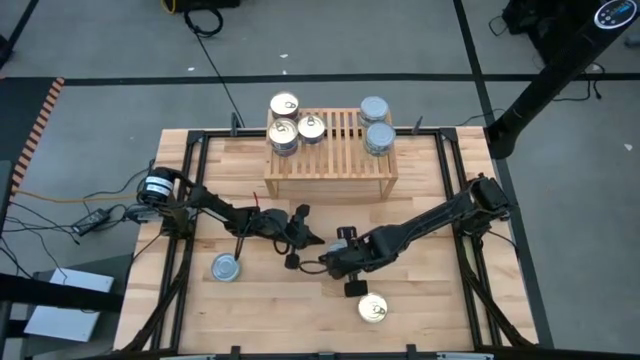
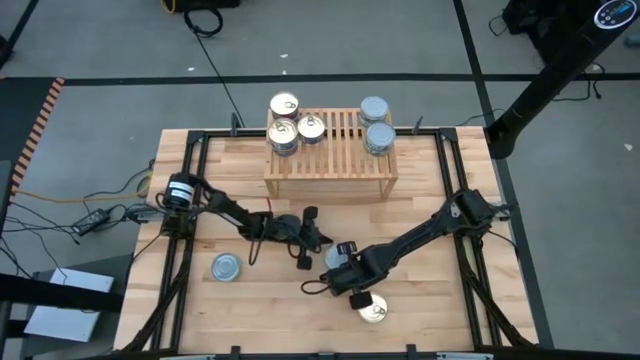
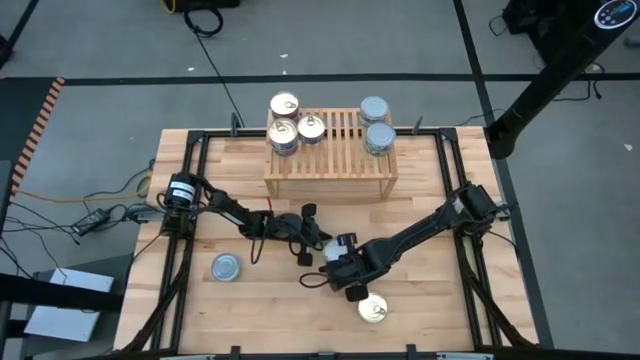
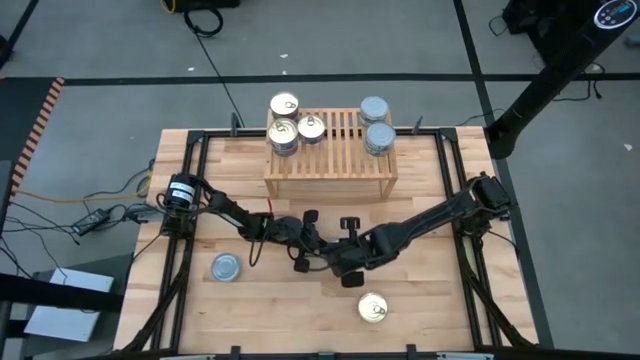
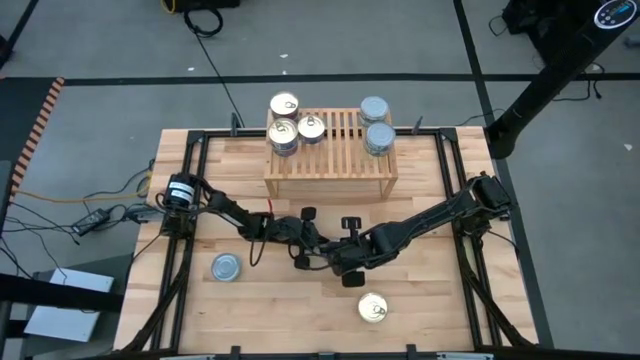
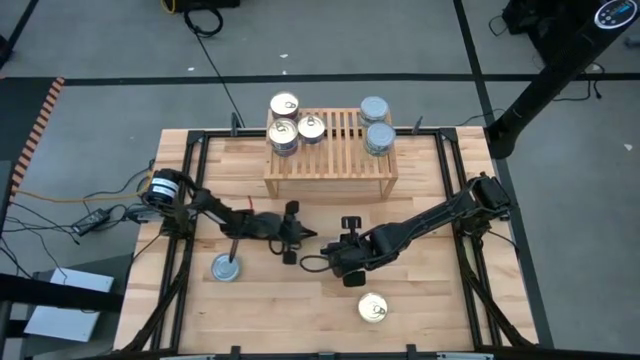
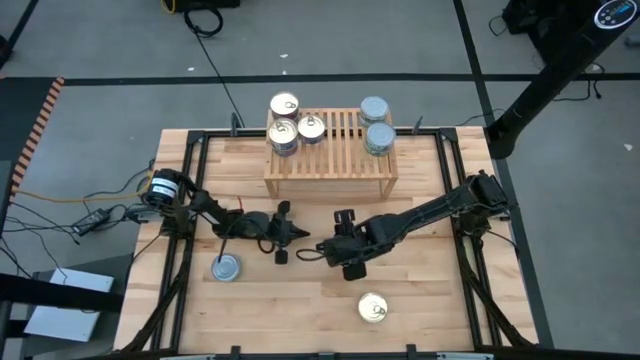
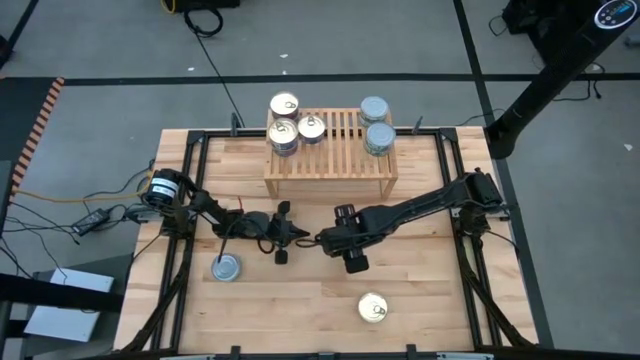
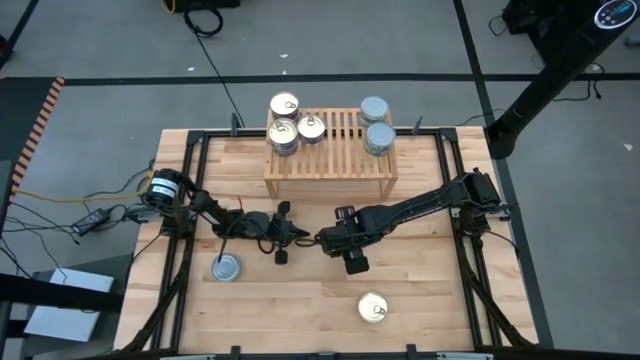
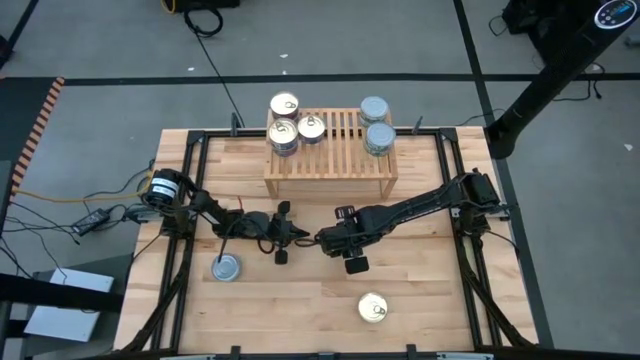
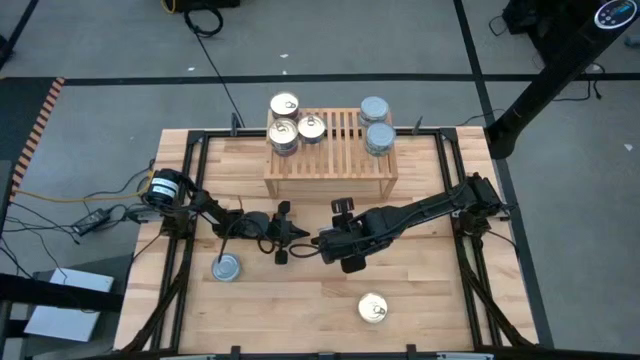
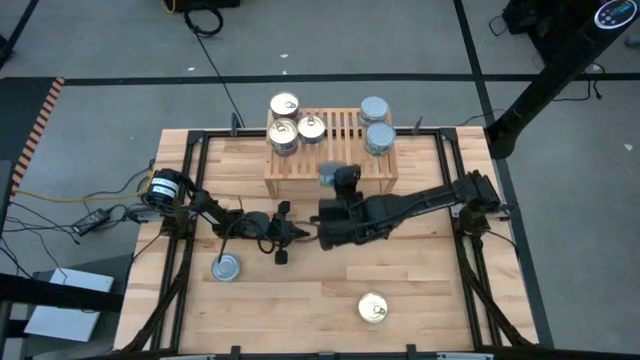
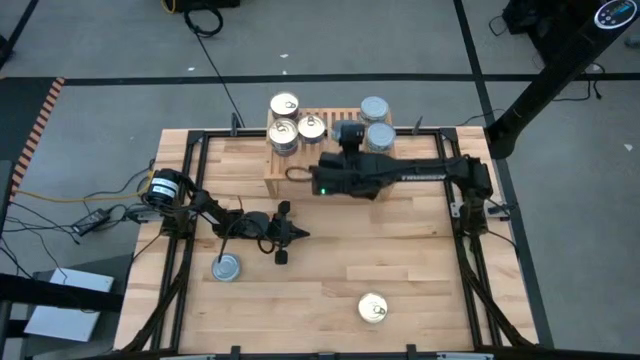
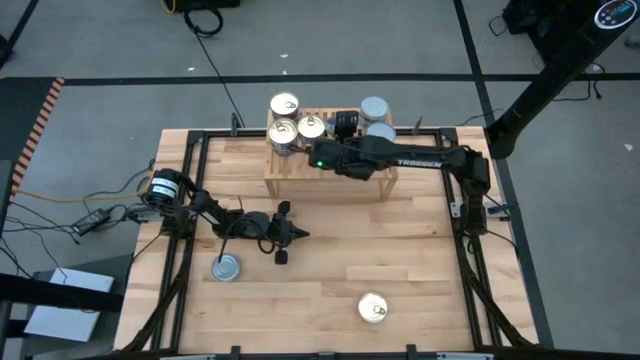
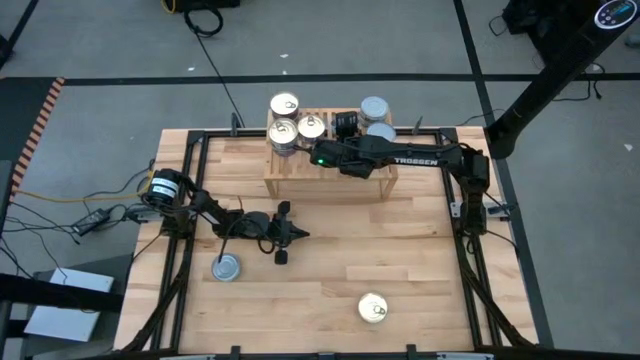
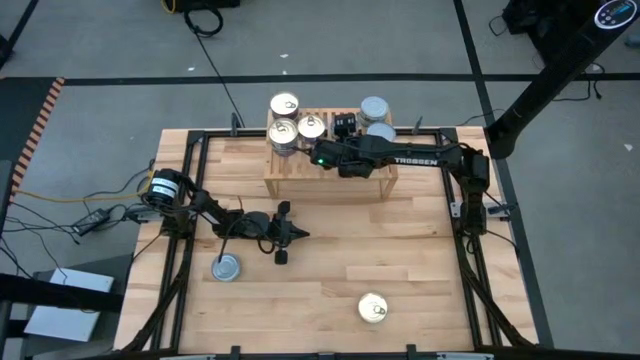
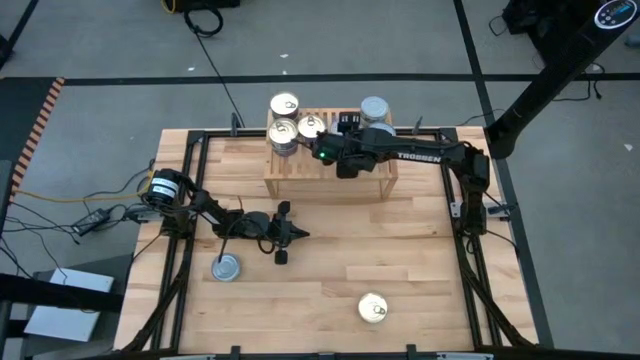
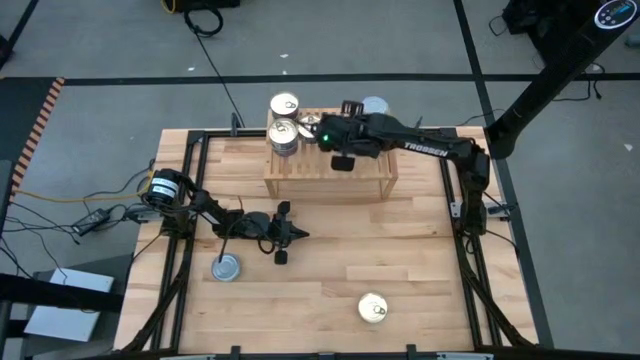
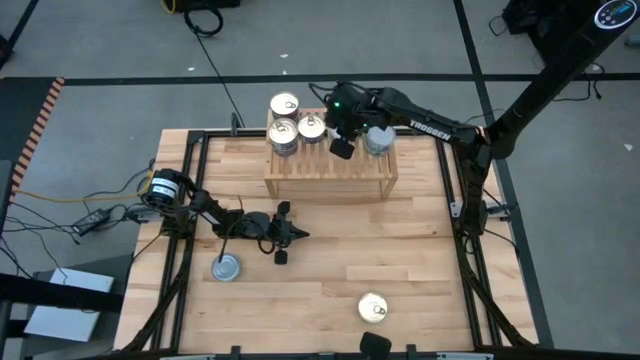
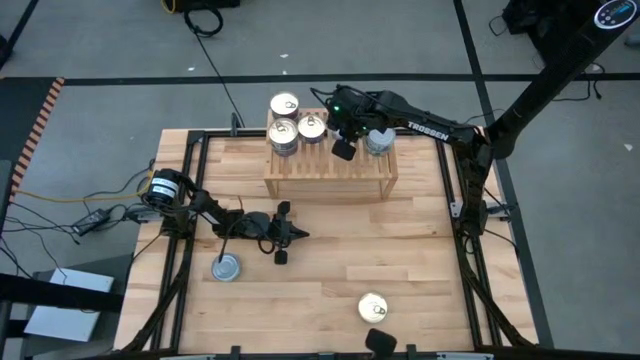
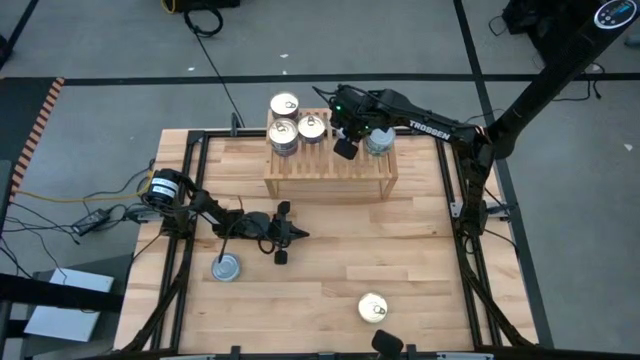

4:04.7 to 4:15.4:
Task: Stack canned seafood by type on shelf
Put the green tuna can on the shelf

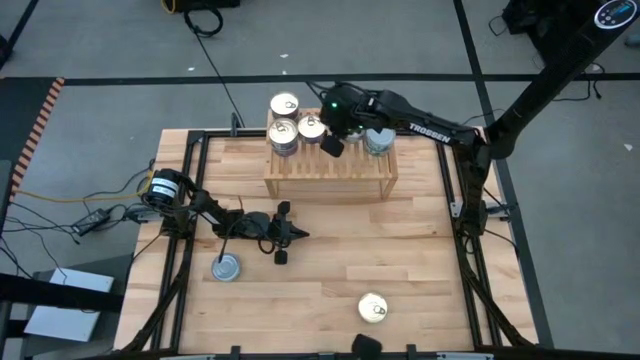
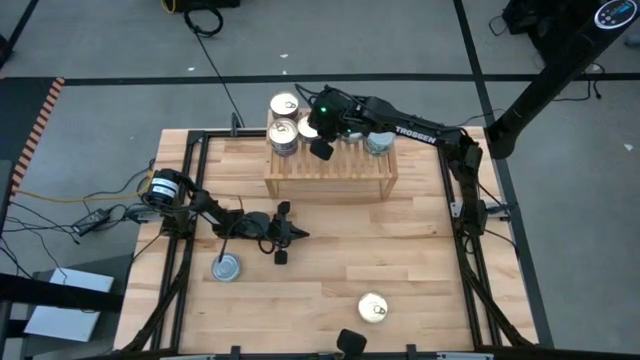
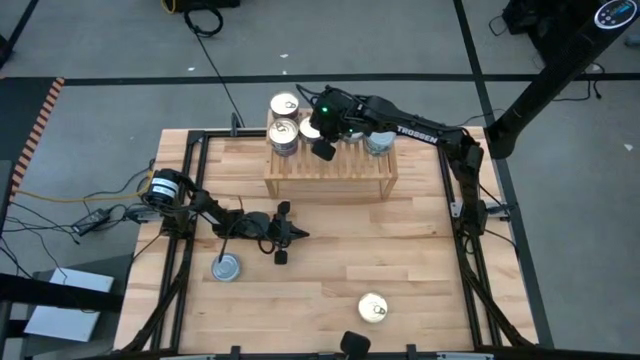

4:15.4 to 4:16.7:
Adjust the blue pink tuna can on the shelf
